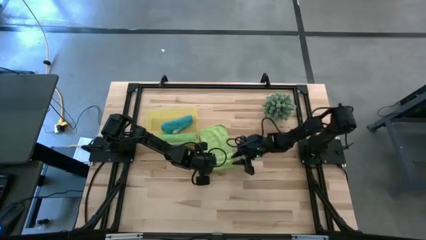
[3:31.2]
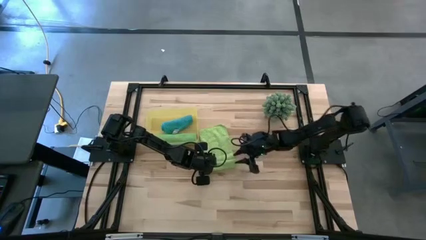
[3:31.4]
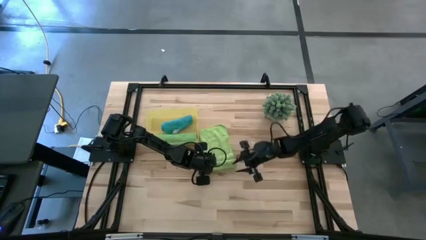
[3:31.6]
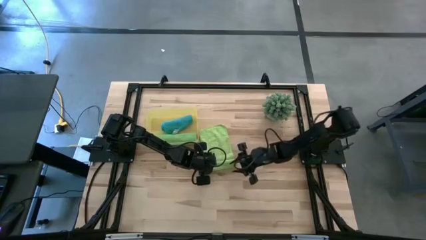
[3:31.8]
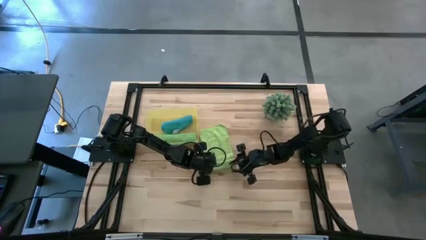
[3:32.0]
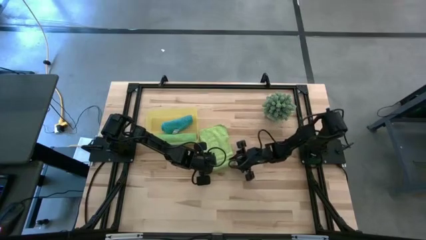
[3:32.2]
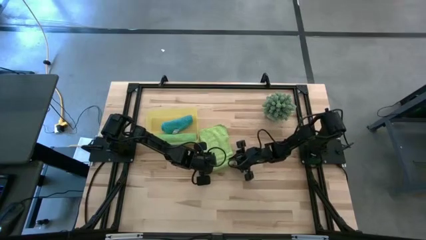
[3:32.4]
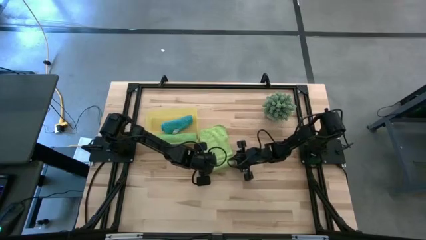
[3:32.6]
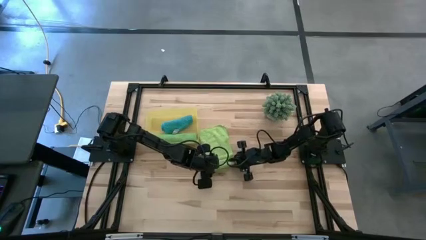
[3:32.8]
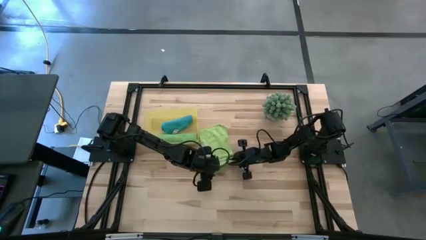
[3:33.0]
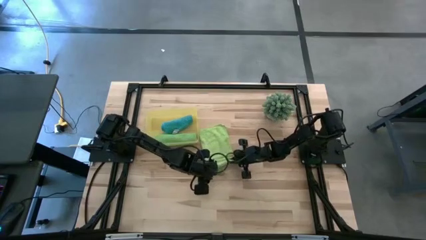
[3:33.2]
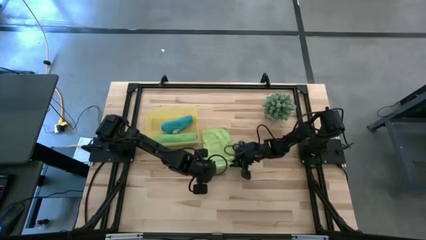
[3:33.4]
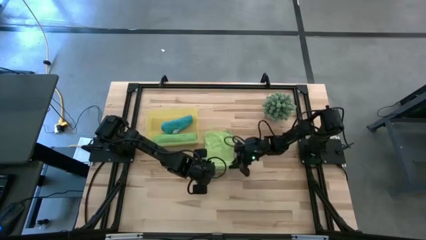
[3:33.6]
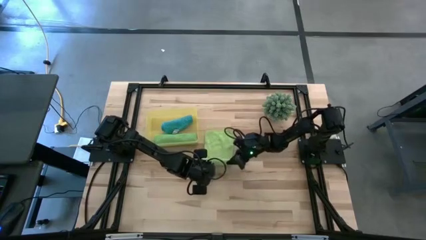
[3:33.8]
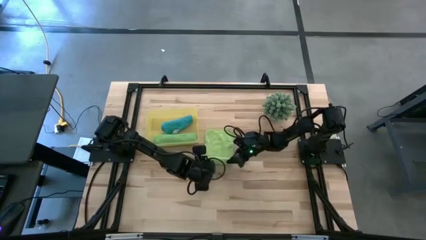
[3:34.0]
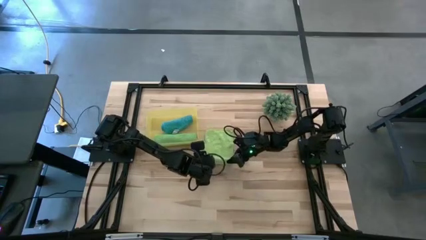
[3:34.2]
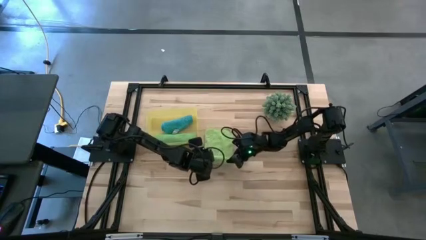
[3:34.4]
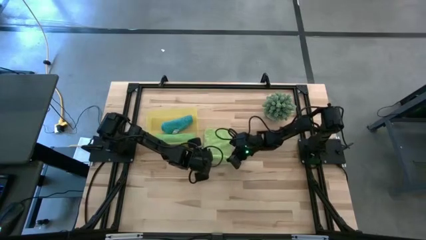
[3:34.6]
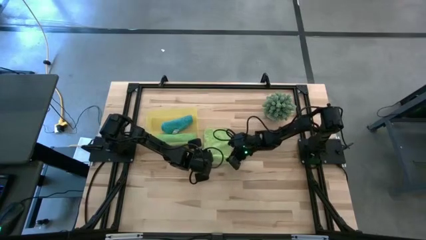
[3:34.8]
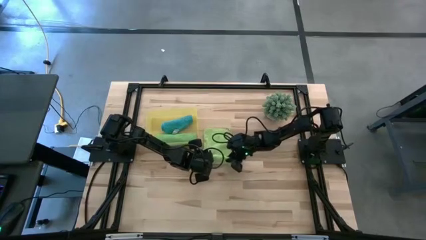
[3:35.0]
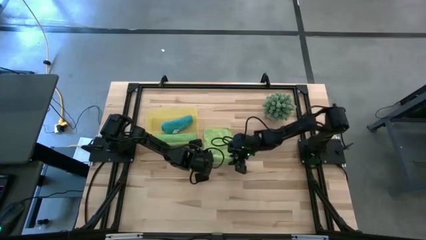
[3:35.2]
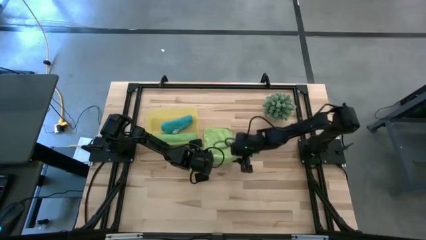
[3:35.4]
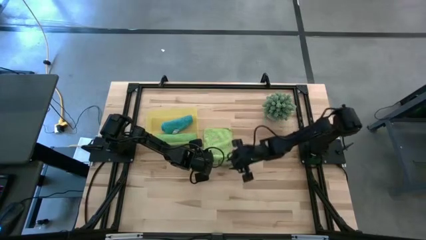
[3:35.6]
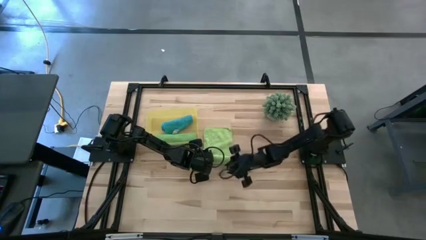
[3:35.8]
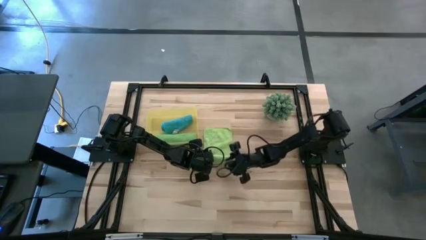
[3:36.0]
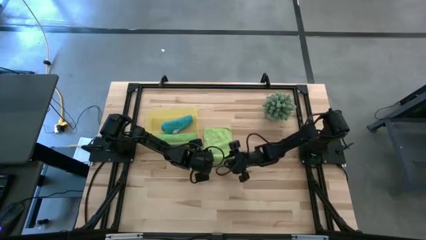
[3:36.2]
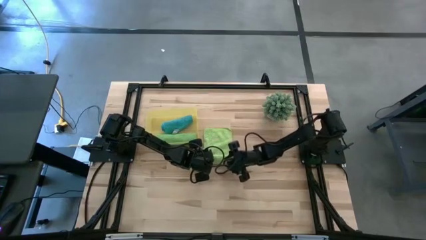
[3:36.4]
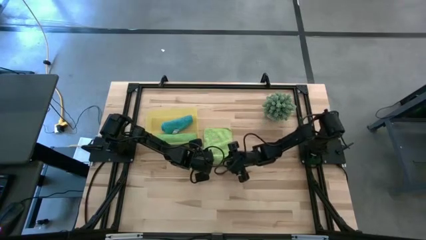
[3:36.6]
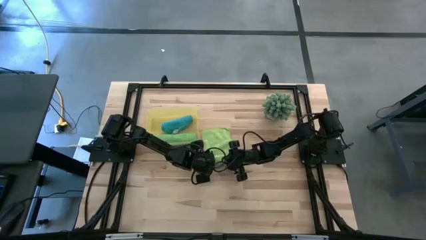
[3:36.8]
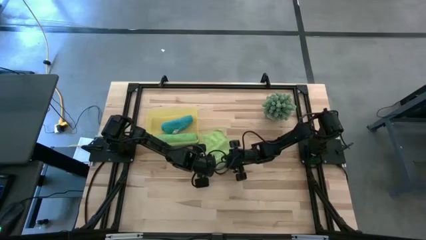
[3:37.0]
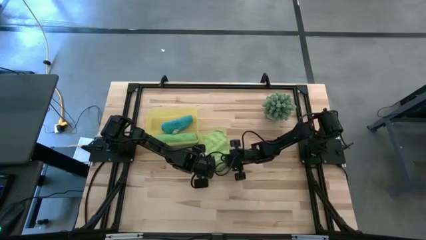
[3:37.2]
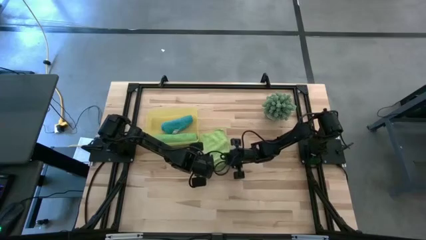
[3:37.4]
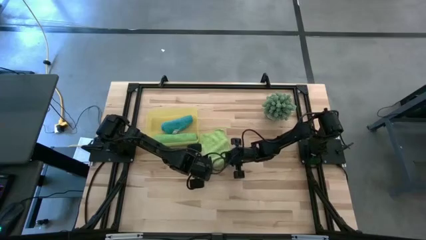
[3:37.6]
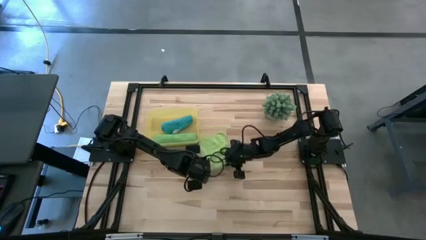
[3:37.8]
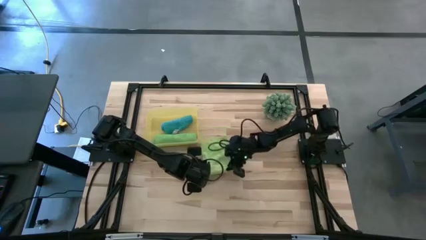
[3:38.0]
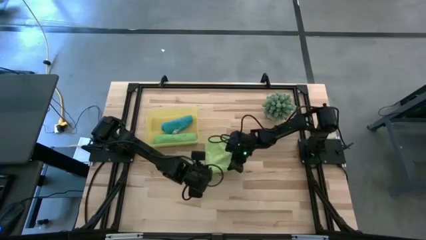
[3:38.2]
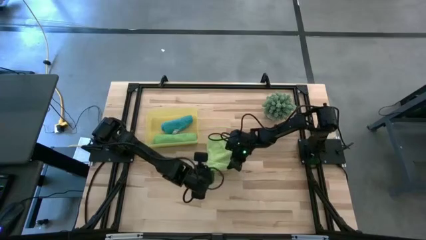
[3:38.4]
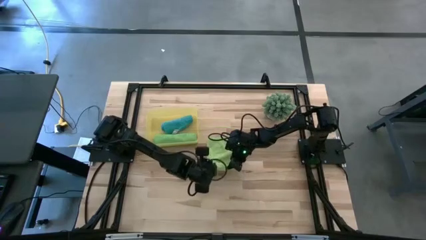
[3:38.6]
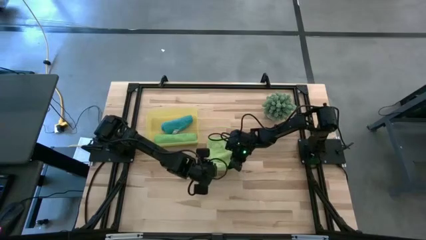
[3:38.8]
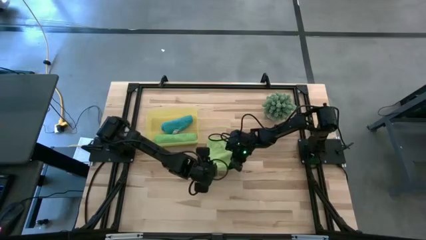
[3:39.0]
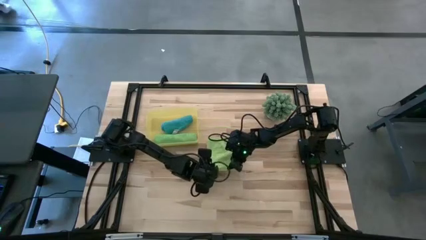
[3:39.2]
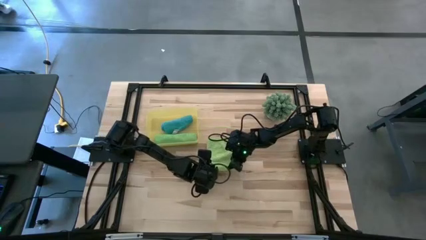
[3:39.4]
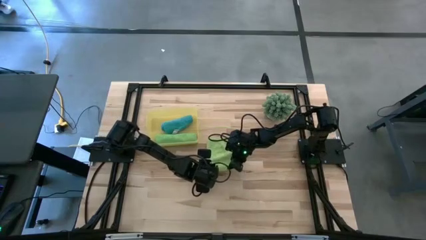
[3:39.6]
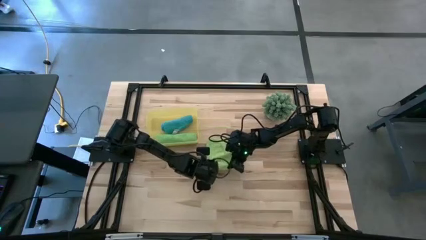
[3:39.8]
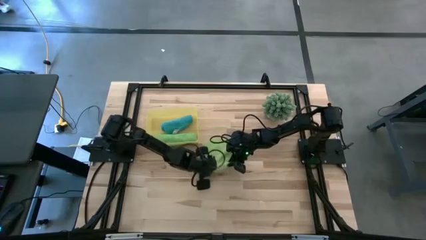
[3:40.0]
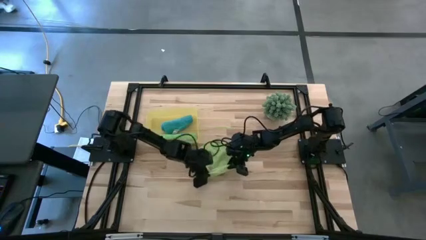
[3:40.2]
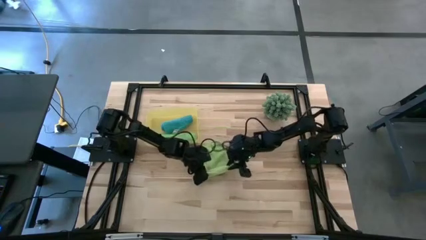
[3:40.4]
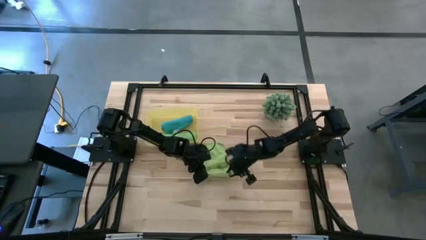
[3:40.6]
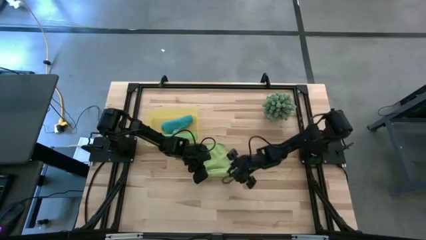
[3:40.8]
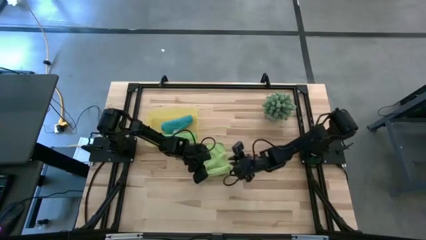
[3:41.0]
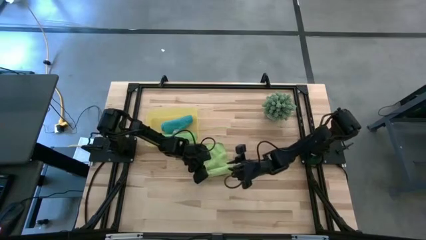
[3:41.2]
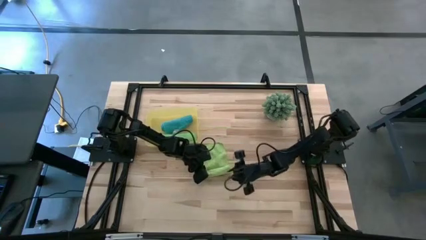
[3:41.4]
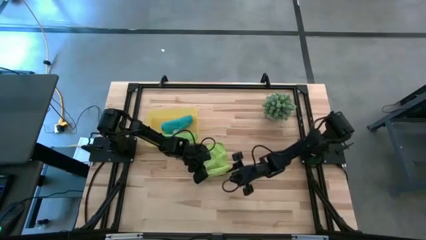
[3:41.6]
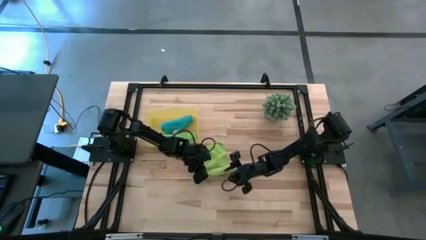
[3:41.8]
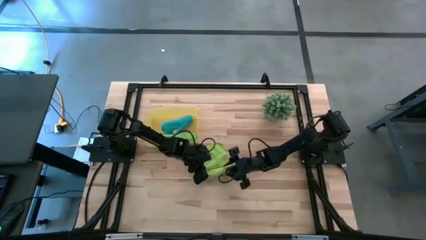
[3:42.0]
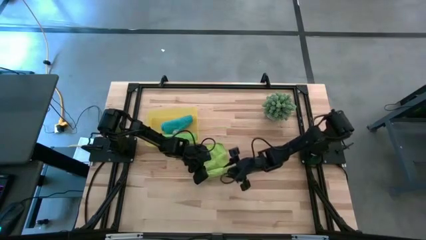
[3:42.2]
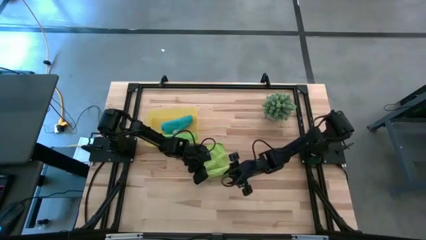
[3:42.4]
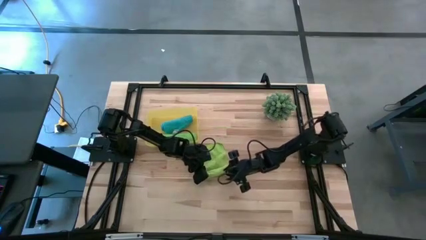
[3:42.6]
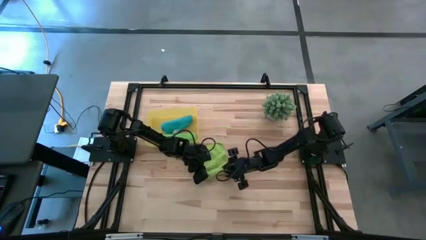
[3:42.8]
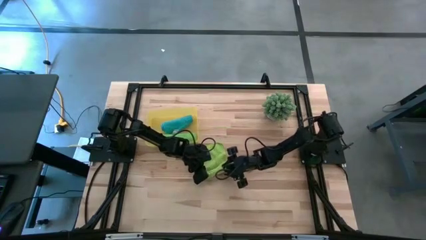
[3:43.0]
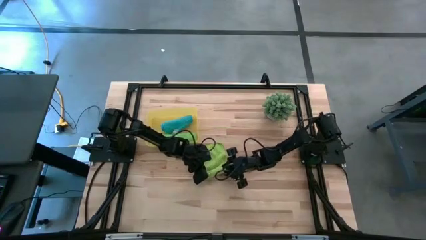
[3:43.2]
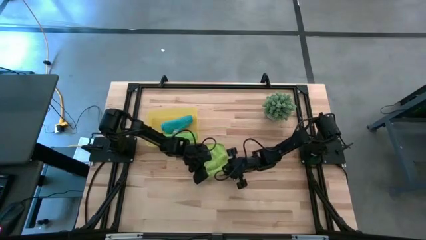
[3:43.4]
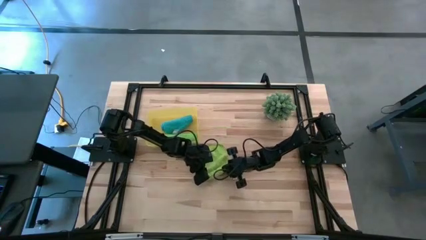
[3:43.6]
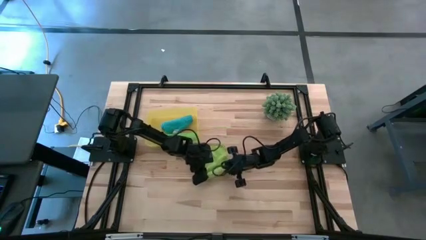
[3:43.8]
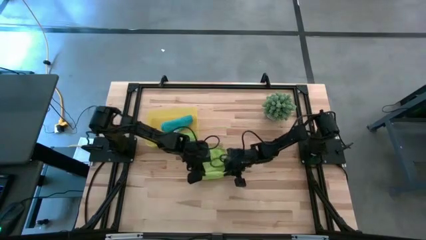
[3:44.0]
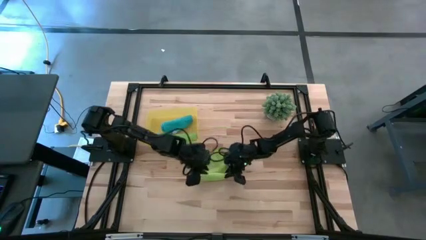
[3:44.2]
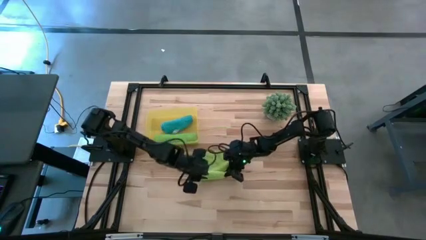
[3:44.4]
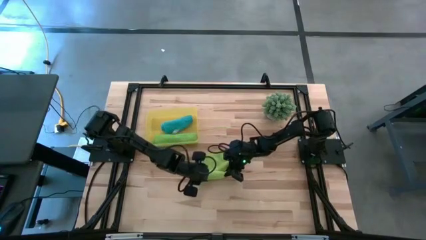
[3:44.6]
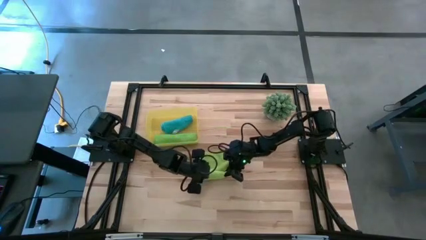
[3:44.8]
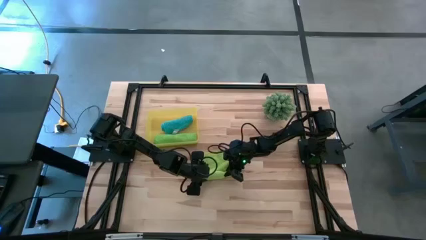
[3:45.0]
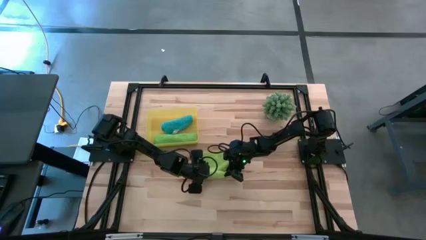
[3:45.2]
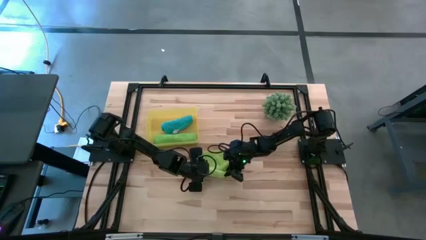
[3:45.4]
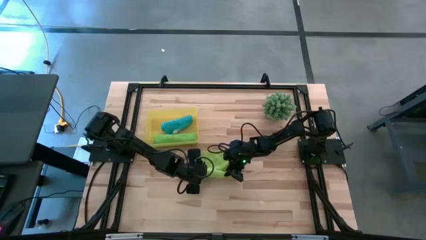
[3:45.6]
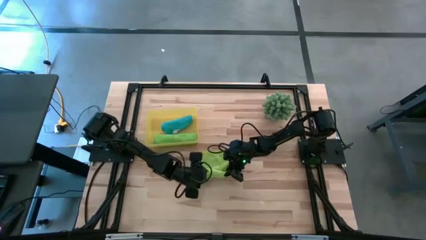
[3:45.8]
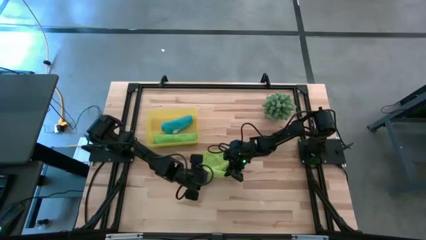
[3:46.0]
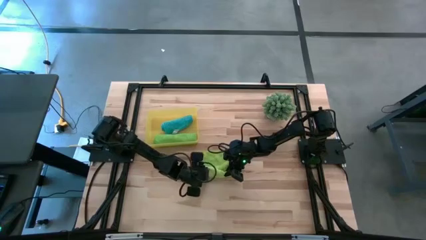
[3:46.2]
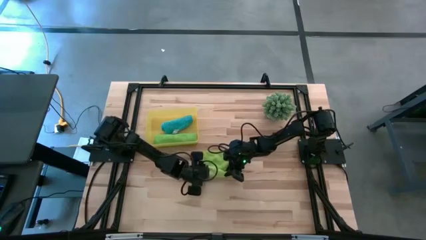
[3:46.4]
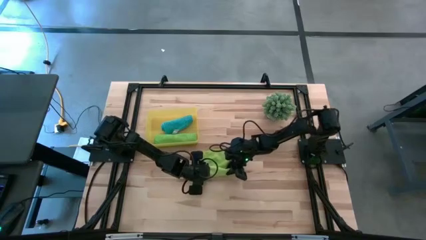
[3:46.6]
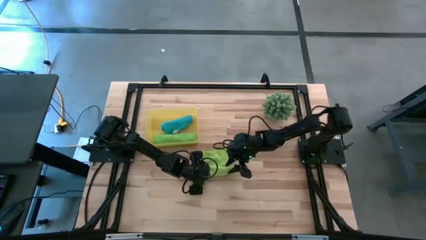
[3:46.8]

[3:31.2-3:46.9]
Task: Roll microfiber towels into tight, uniform cylinder then place into a basket
Roll the light green microfiber towel
